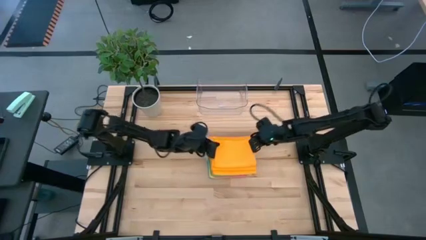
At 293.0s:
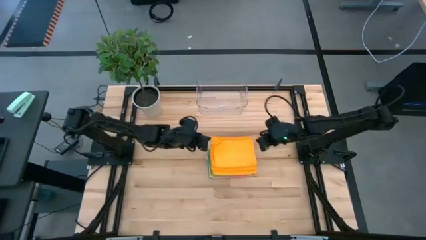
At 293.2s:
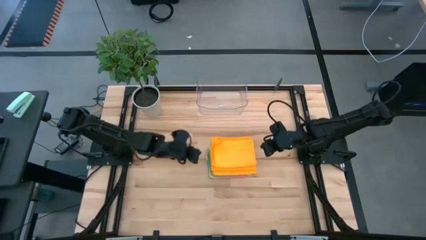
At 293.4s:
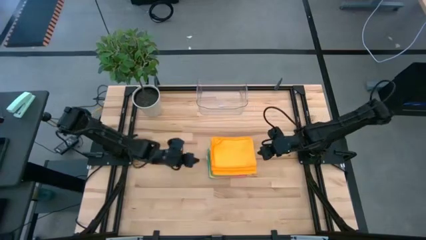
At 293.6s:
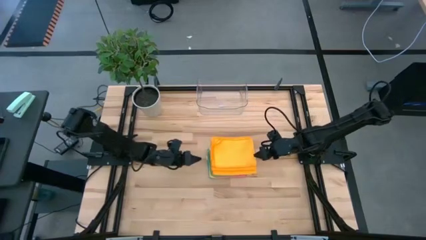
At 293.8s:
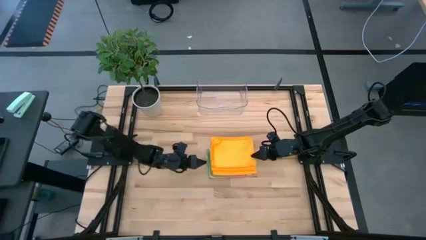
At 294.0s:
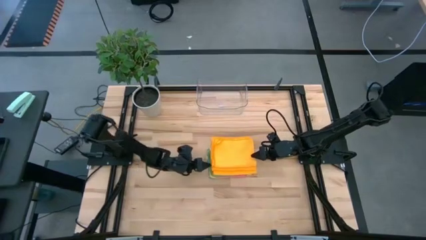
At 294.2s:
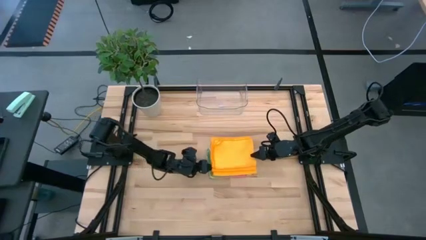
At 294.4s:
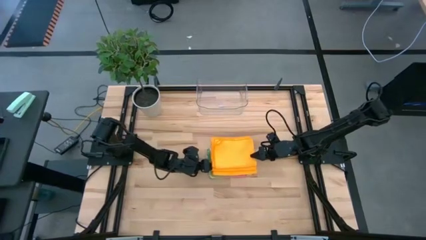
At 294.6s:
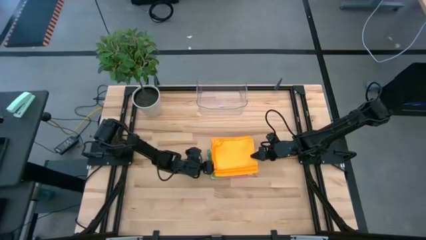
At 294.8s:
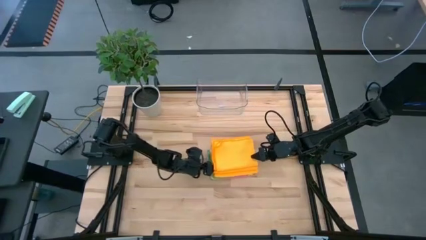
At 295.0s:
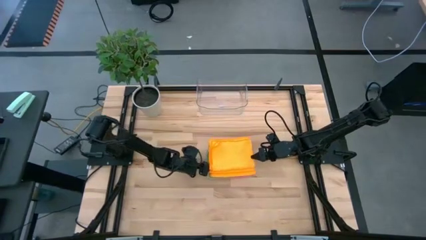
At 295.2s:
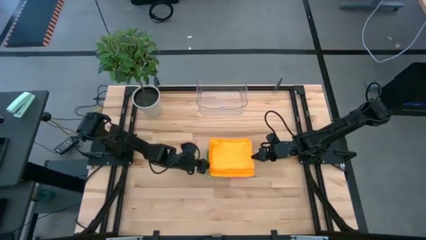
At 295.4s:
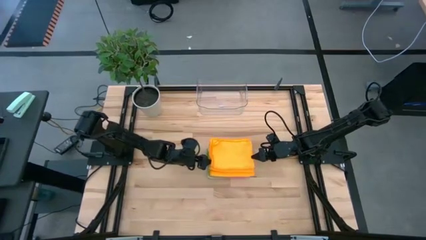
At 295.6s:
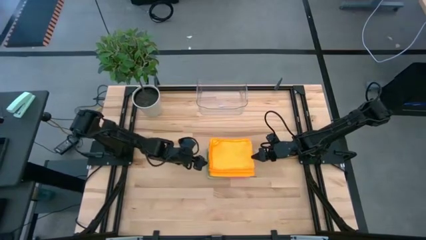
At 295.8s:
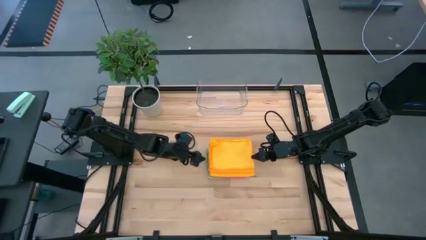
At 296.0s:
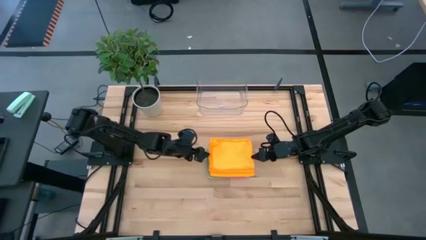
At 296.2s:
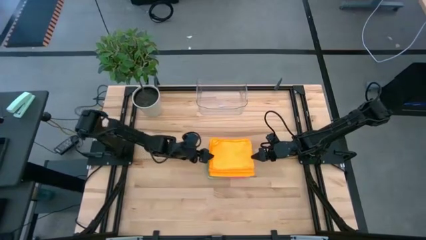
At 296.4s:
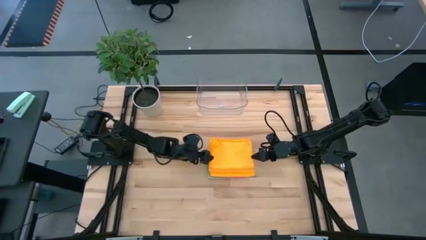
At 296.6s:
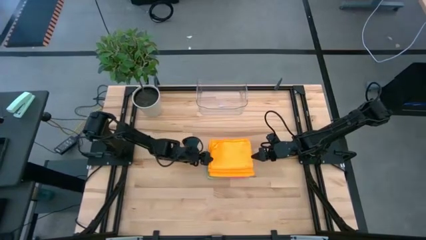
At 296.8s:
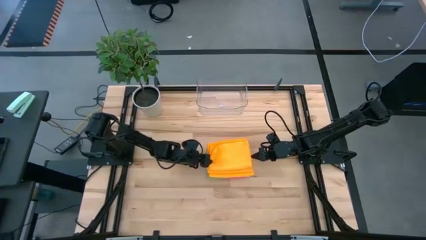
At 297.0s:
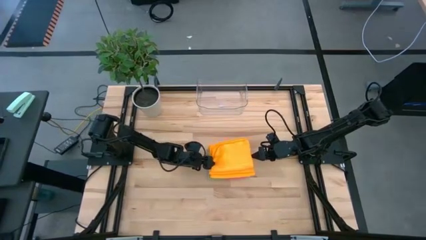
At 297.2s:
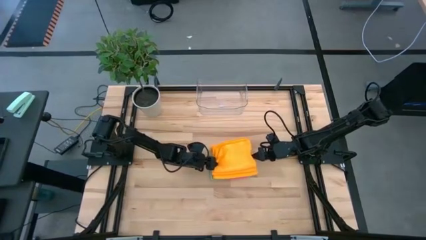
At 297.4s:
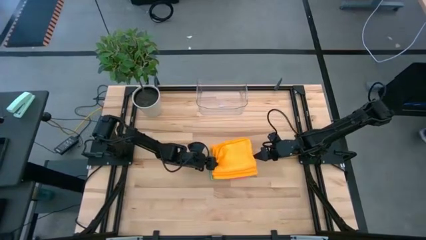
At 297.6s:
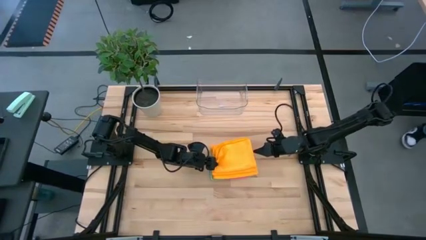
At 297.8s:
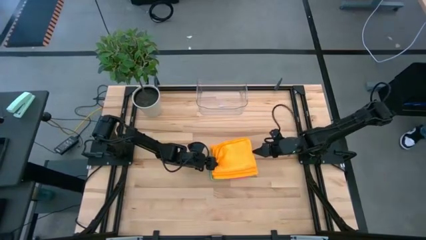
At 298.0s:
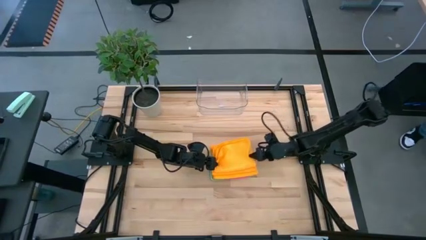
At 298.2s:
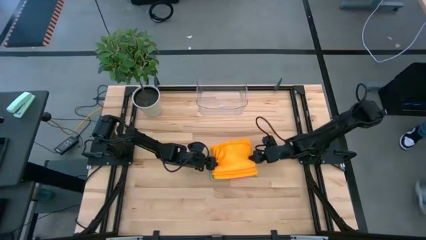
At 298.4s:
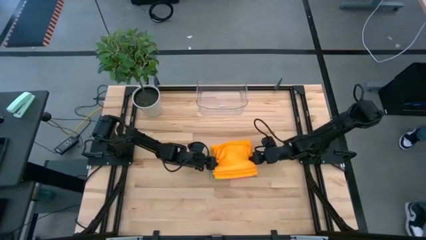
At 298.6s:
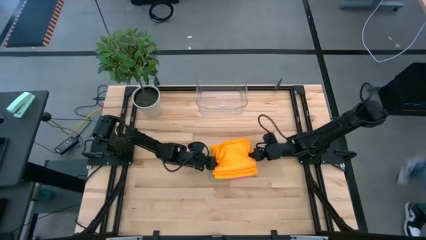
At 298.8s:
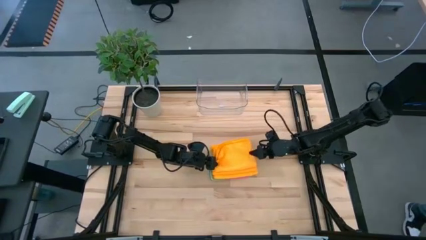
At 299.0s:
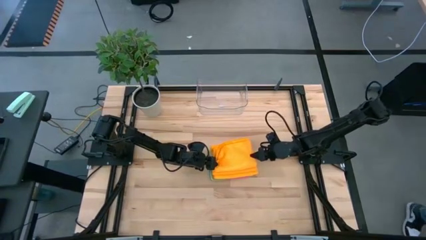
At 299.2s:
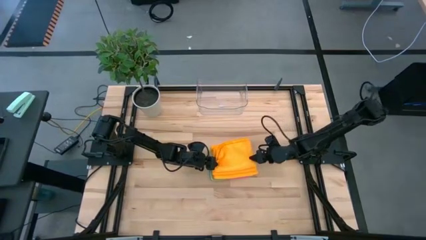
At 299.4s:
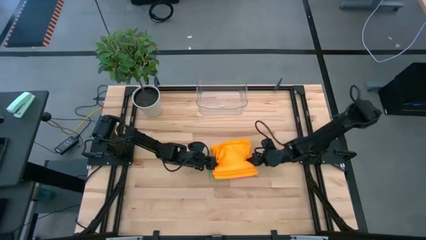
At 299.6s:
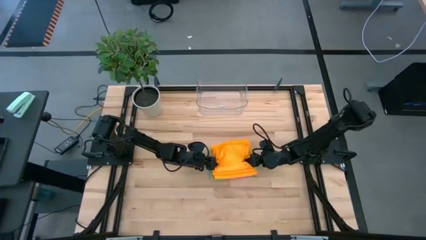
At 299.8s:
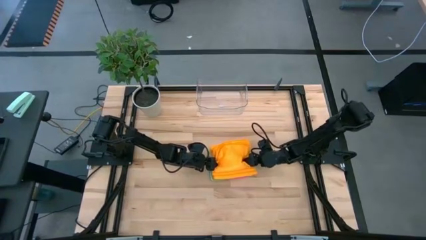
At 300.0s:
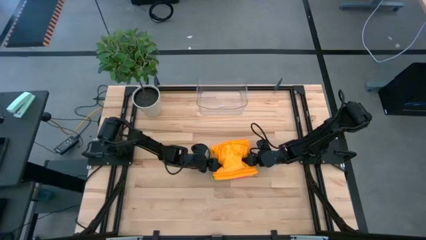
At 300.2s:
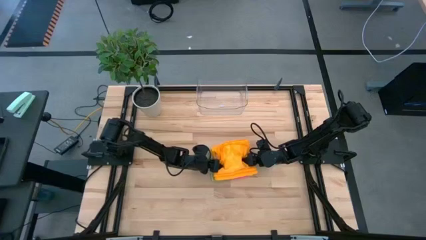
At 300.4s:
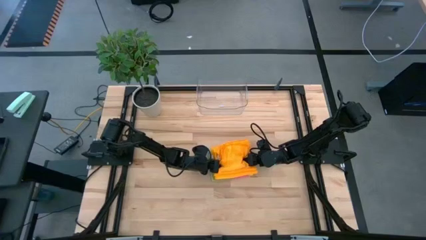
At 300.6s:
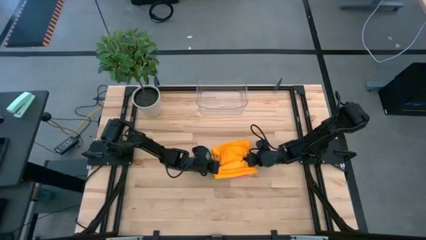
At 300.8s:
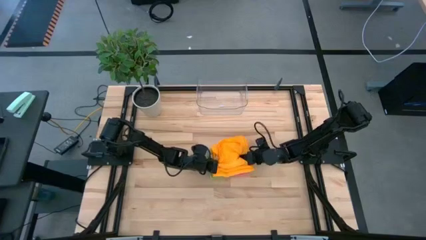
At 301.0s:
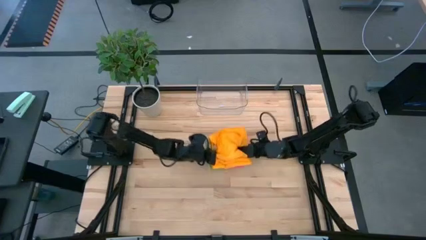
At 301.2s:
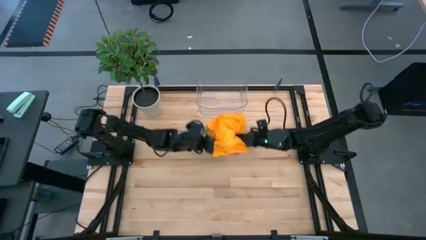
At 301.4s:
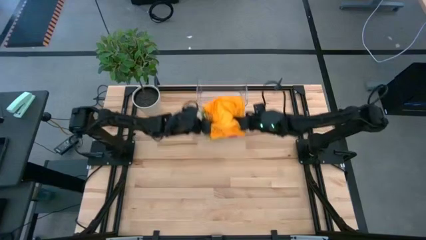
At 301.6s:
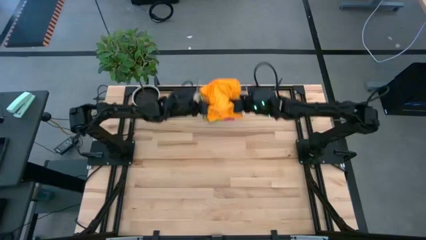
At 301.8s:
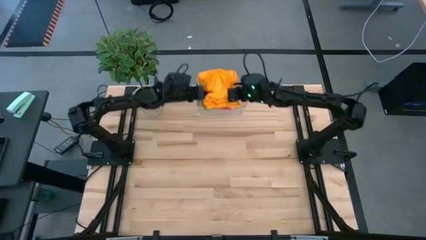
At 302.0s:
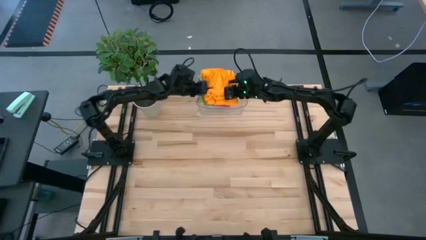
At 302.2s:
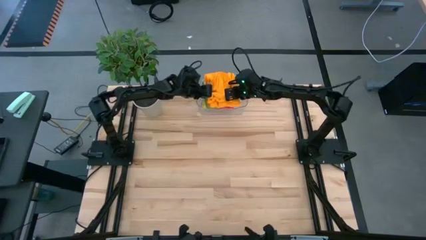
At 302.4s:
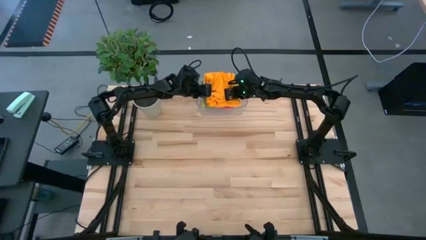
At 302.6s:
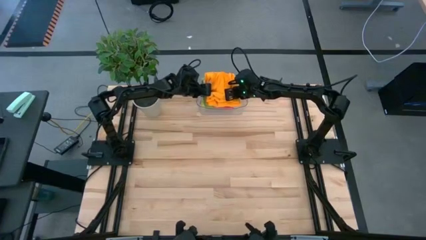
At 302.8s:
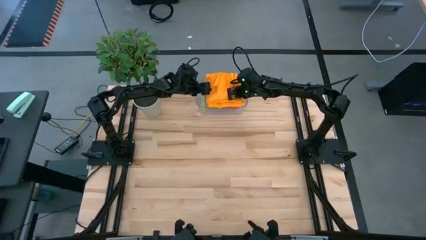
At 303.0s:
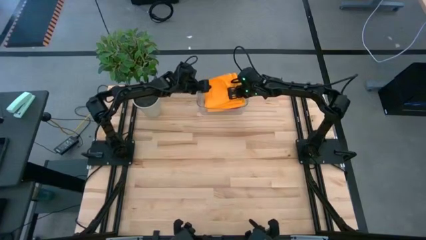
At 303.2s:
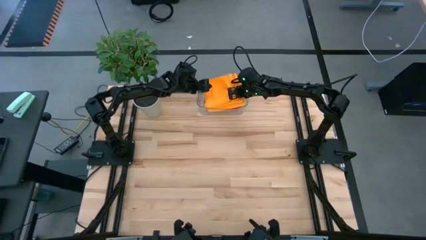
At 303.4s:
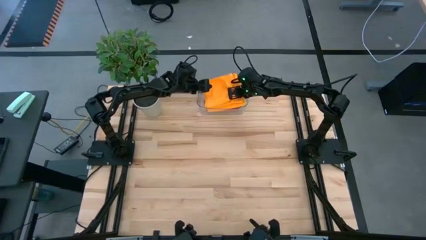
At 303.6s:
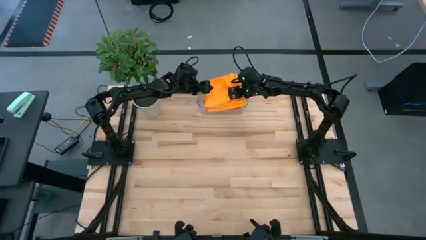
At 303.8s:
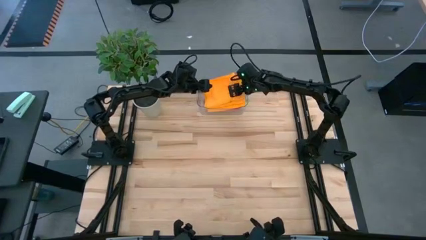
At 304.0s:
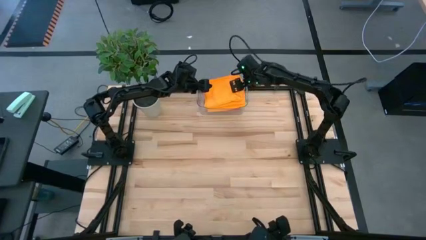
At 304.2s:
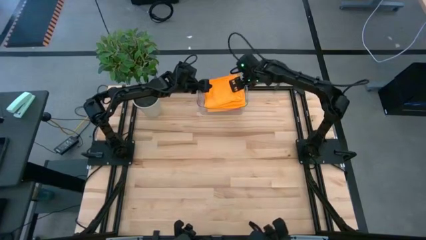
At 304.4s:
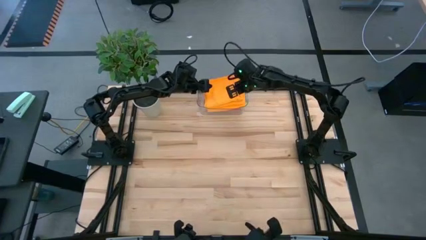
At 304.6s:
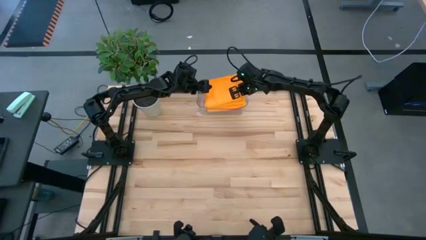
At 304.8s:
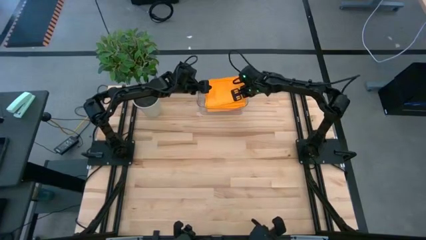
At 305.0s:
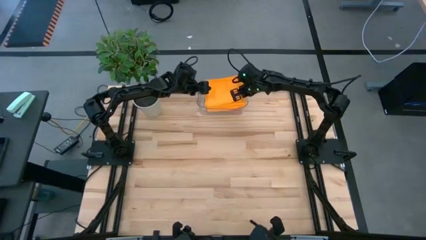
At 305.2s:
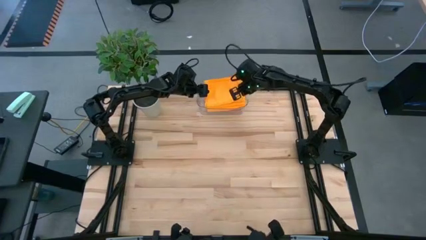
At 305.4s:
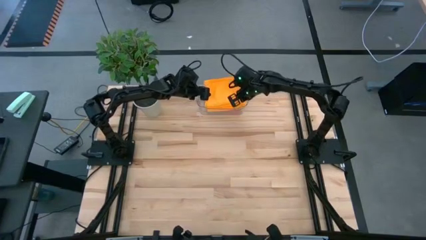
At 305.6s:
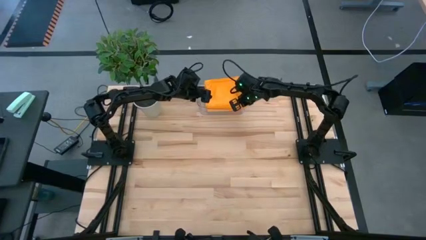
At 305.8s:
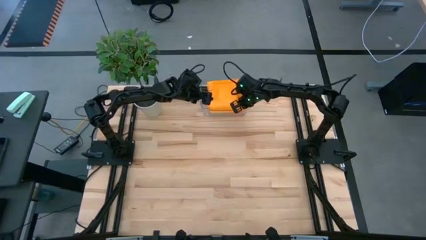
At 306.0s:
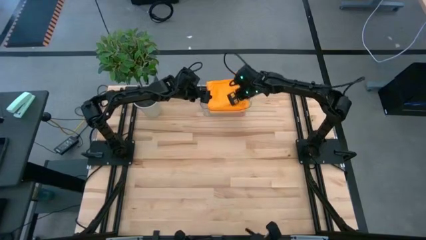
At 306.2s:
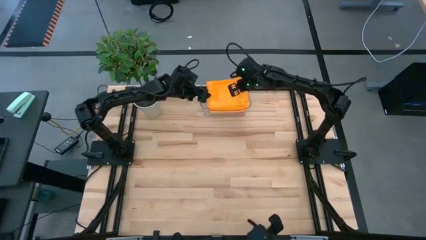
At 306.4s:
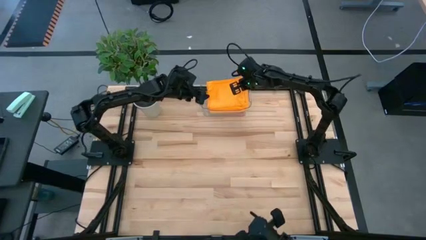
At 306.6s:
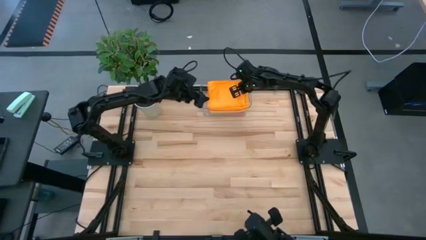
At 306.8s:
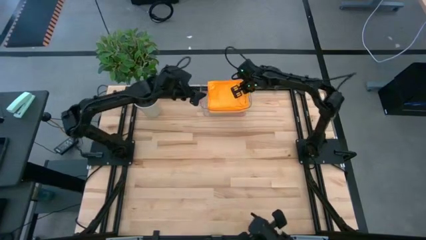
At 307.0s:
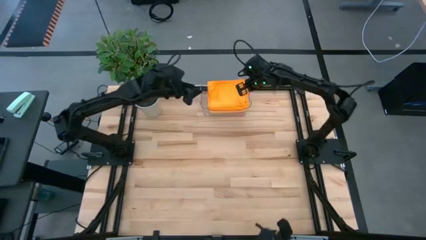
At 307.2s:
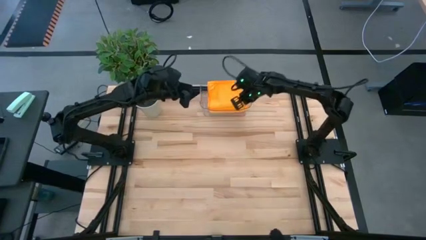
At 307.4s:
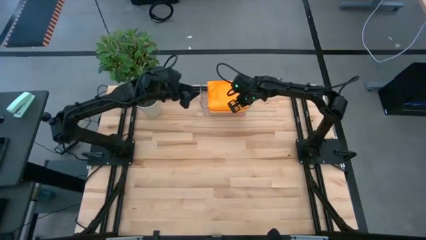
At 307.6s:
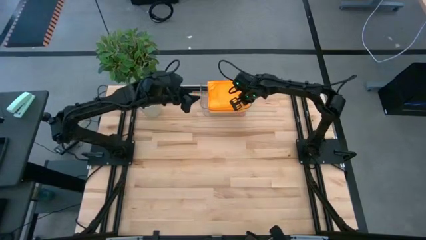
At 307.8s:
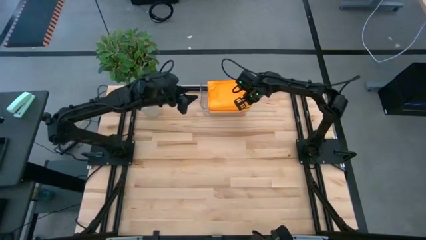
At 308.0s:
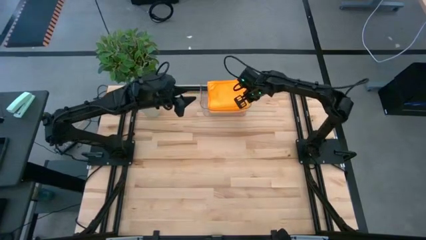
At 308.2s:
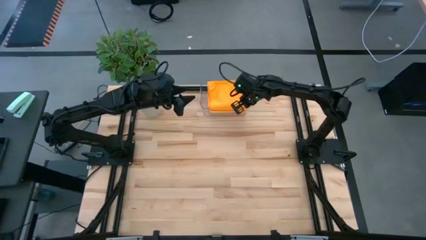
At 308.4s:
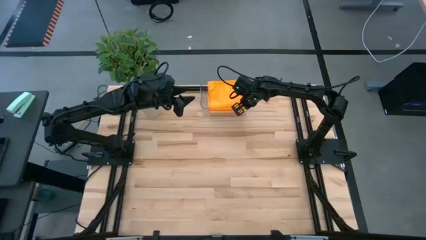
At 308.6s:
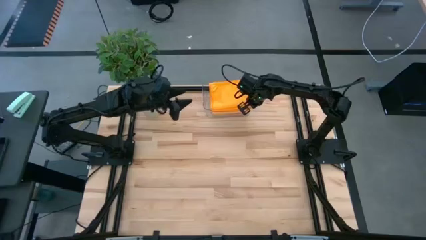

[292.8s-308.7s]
Task: Fold microfiber towels
Put the stacked towels into the transparent bin

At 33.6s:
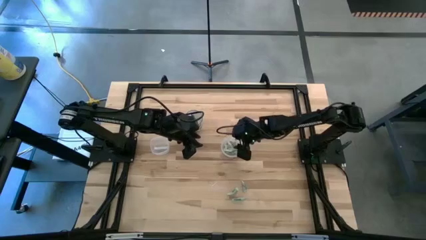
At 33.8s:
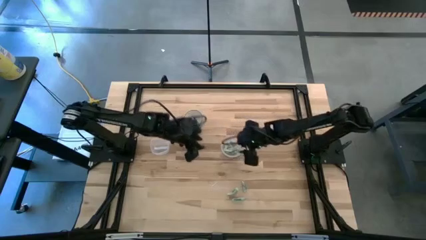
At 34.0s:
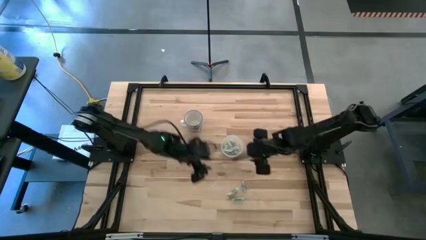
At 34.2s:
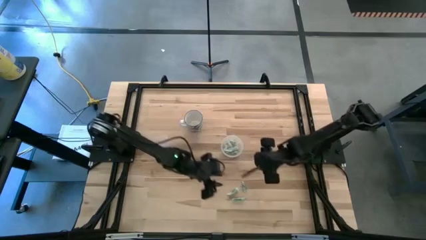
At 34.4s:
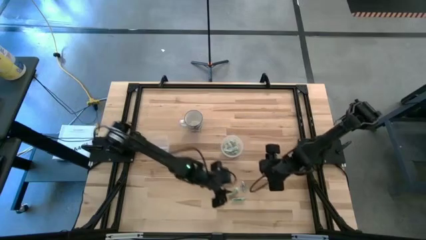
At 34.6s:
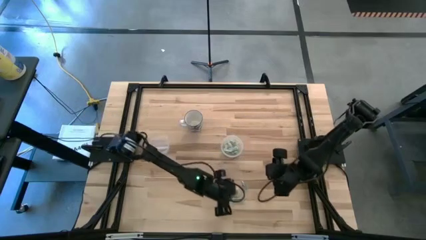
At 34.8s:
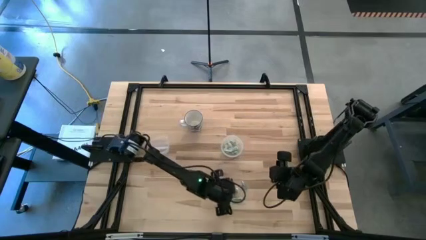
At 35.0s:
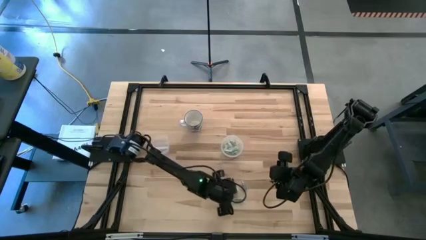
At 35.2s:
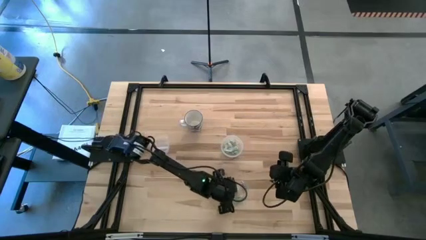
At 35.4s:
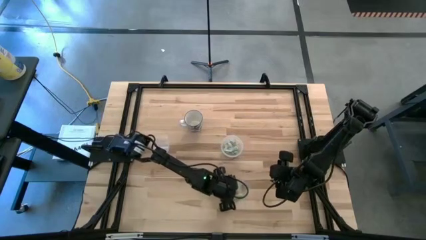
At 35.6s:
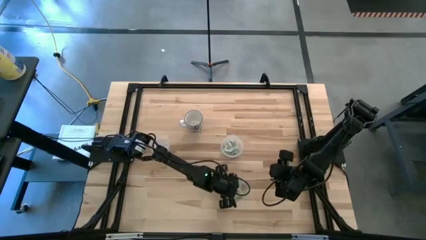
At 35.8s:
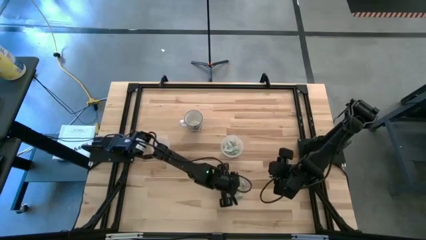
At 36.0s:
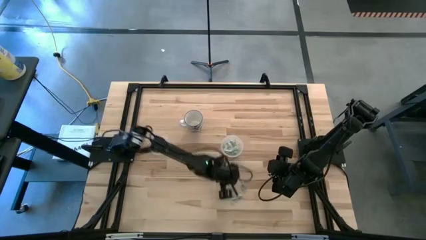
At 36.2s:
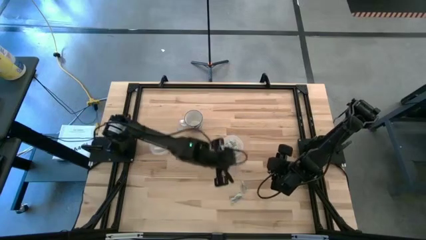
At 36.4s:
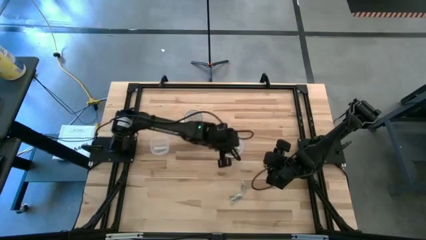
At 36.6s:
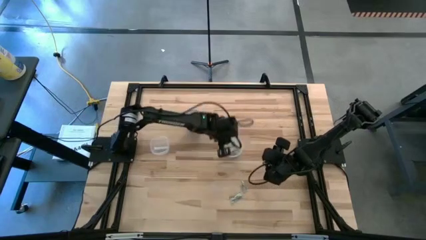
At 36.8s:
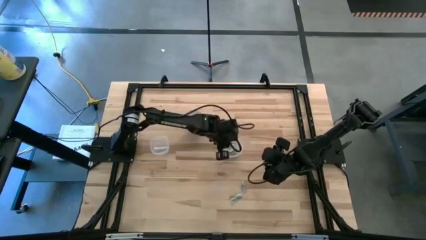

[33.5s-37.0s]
Task: Pick and place Stevia / Truvia into bins
Put the green stevia packet into the right transparent container
